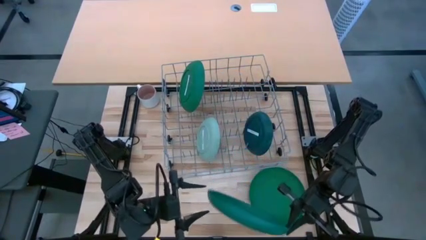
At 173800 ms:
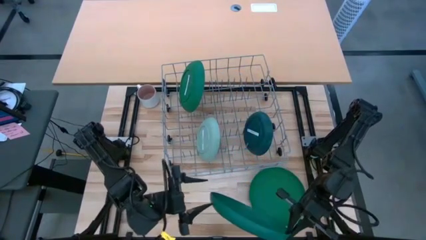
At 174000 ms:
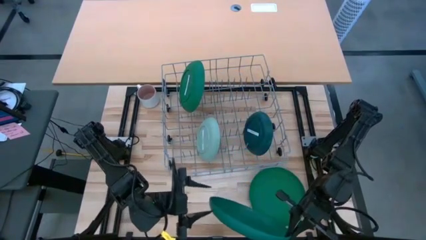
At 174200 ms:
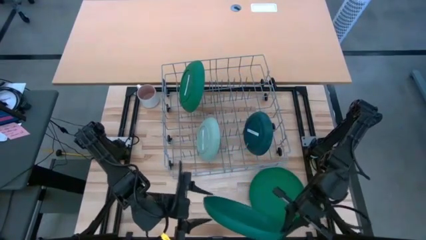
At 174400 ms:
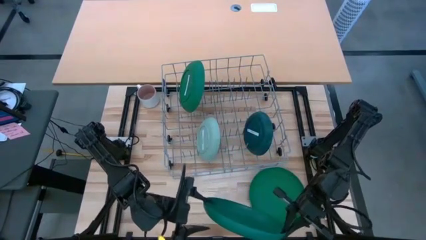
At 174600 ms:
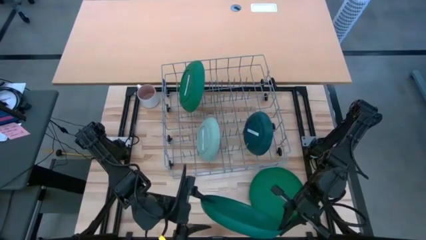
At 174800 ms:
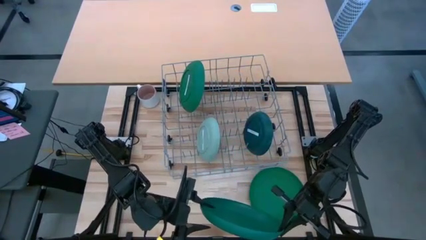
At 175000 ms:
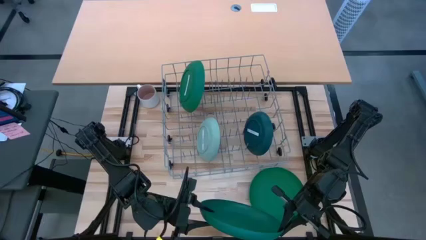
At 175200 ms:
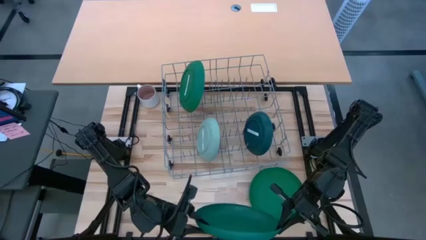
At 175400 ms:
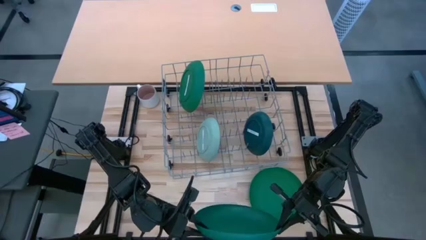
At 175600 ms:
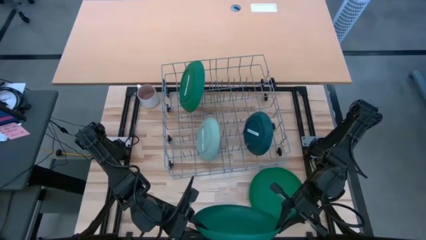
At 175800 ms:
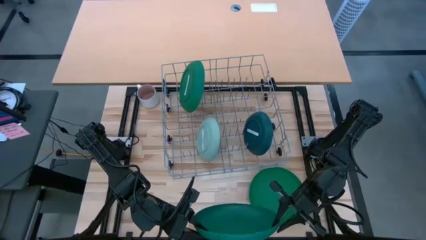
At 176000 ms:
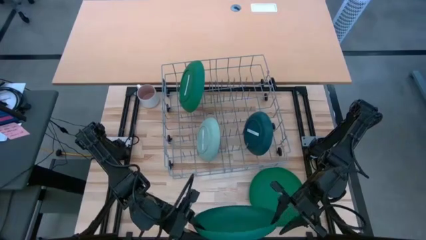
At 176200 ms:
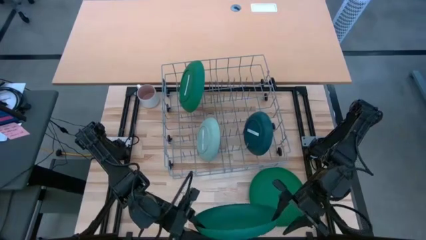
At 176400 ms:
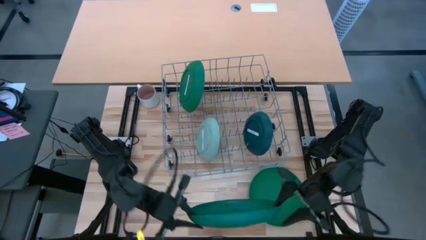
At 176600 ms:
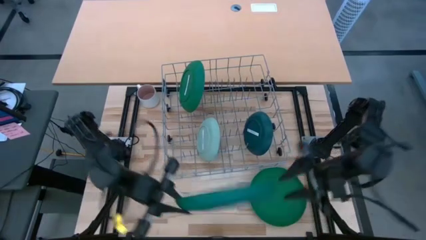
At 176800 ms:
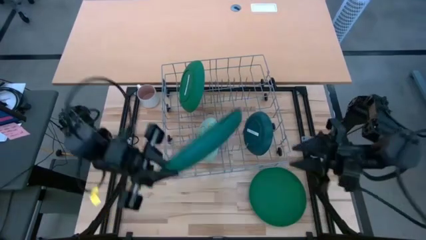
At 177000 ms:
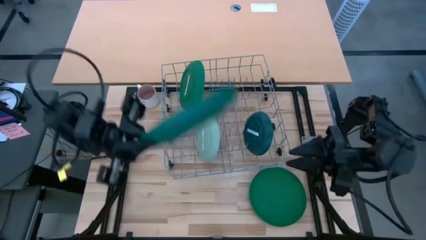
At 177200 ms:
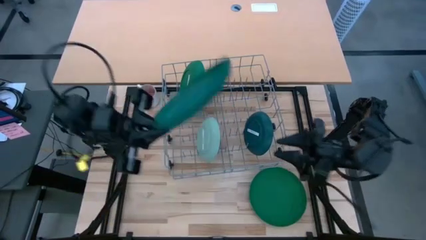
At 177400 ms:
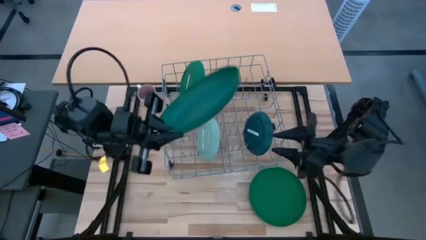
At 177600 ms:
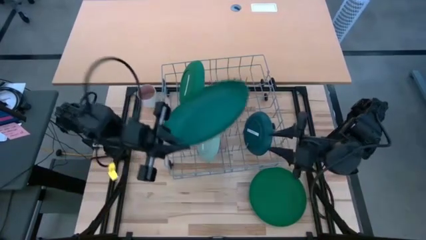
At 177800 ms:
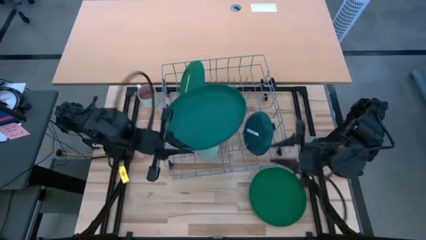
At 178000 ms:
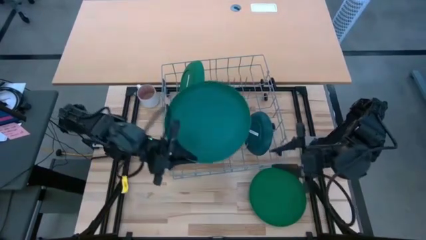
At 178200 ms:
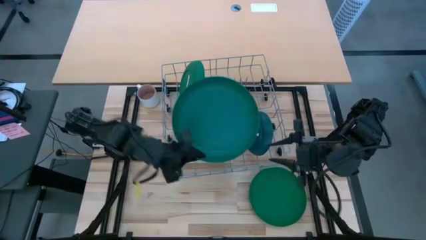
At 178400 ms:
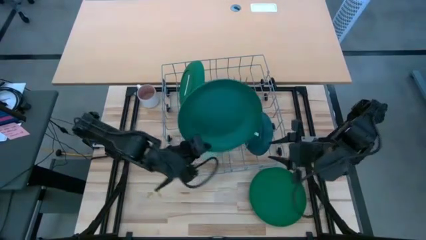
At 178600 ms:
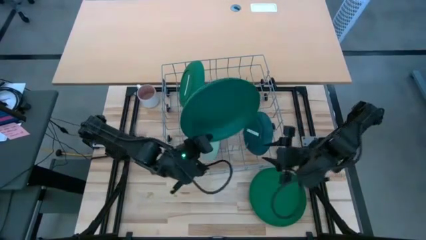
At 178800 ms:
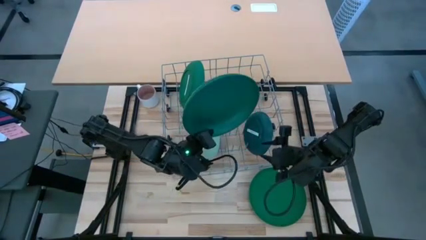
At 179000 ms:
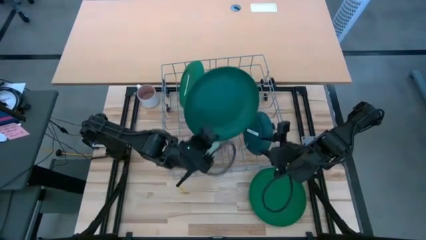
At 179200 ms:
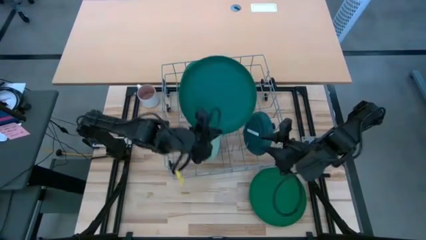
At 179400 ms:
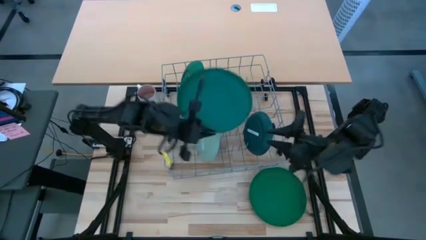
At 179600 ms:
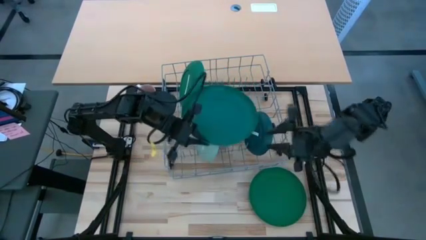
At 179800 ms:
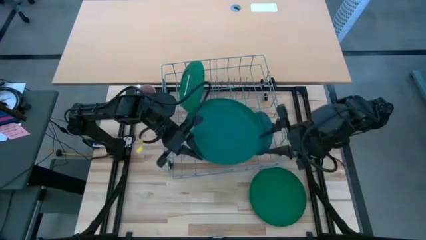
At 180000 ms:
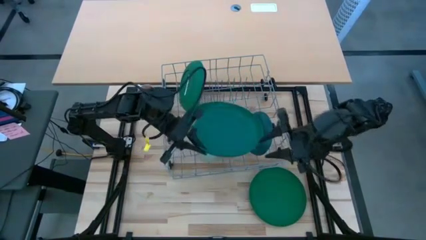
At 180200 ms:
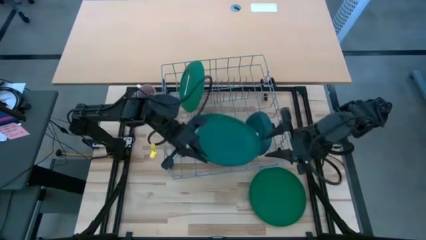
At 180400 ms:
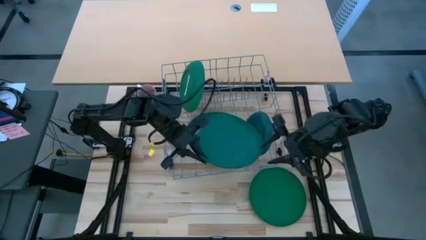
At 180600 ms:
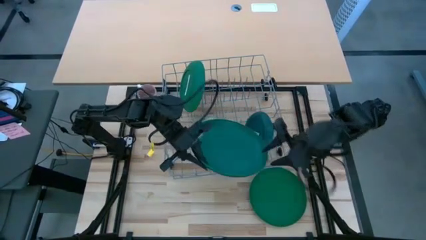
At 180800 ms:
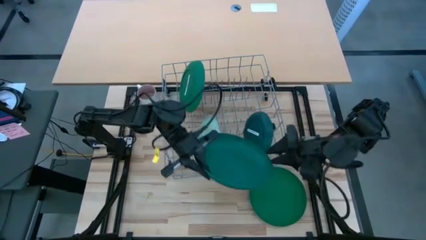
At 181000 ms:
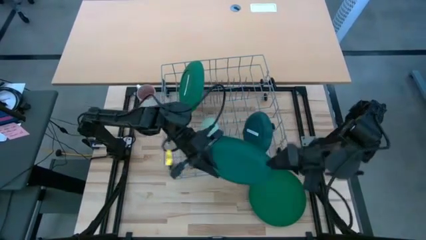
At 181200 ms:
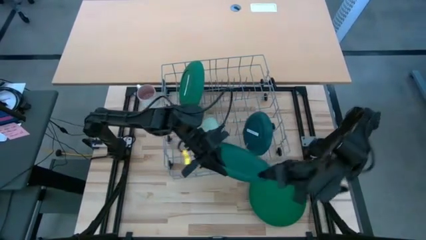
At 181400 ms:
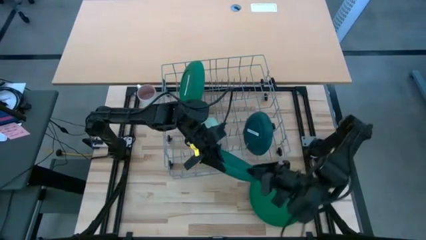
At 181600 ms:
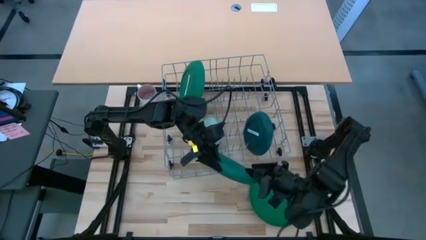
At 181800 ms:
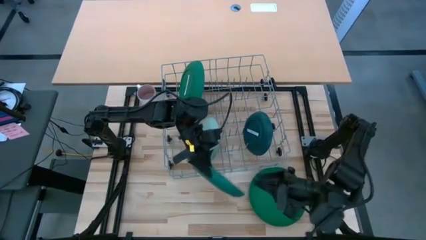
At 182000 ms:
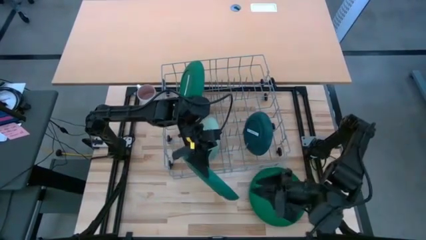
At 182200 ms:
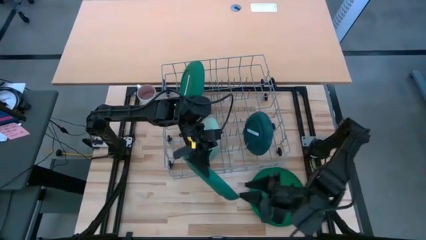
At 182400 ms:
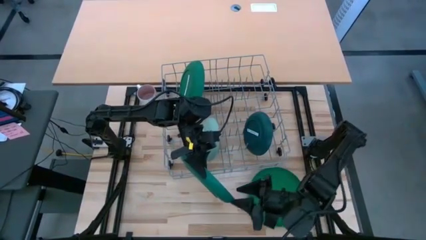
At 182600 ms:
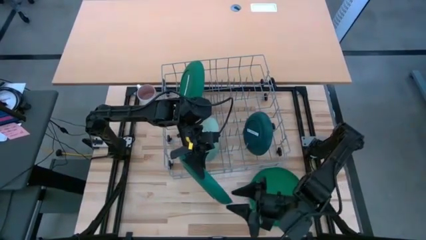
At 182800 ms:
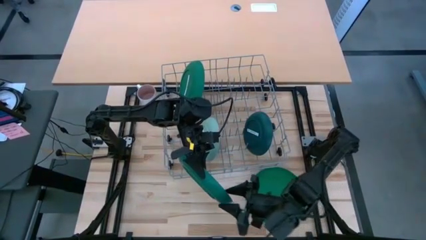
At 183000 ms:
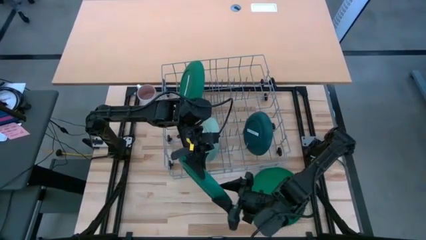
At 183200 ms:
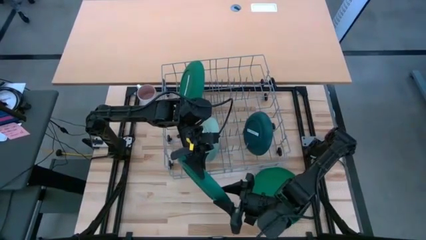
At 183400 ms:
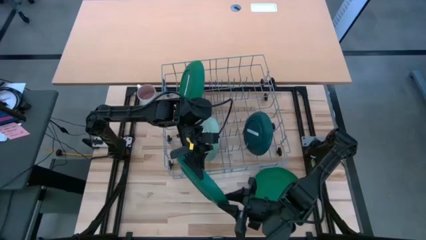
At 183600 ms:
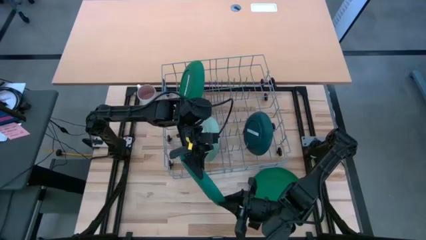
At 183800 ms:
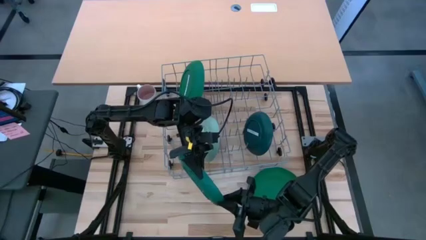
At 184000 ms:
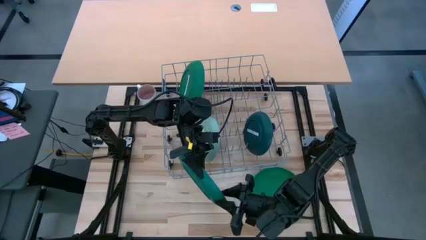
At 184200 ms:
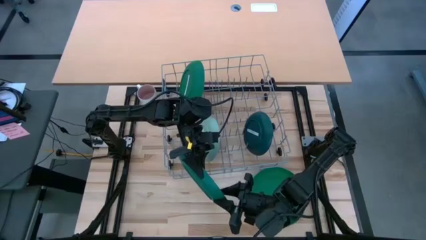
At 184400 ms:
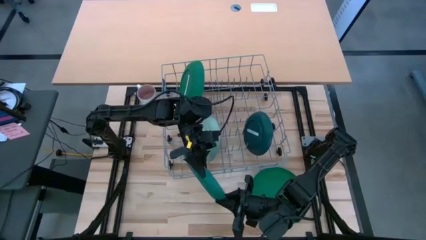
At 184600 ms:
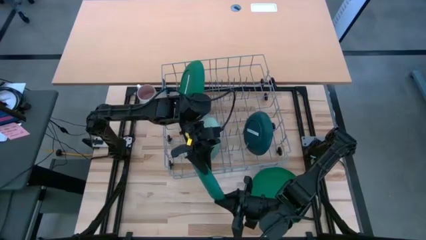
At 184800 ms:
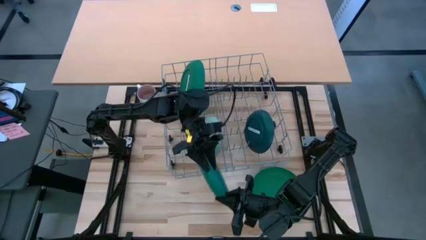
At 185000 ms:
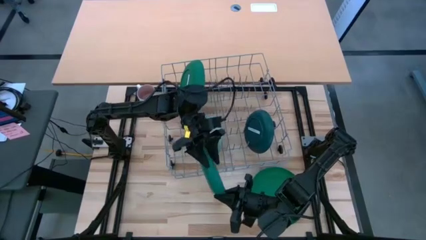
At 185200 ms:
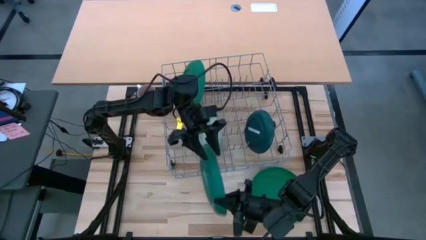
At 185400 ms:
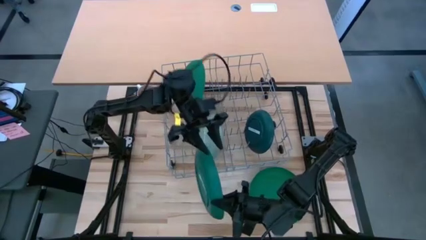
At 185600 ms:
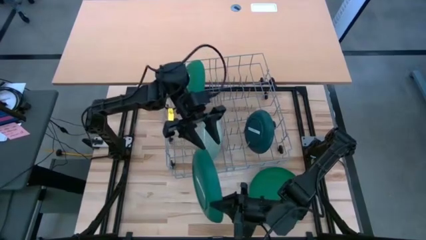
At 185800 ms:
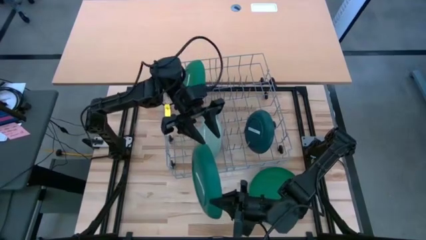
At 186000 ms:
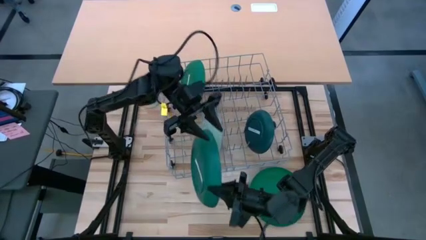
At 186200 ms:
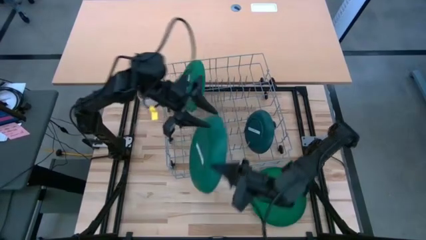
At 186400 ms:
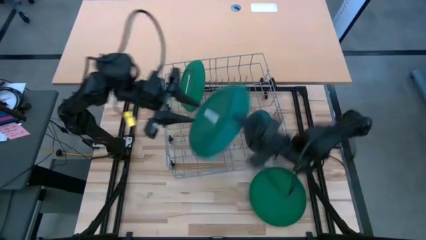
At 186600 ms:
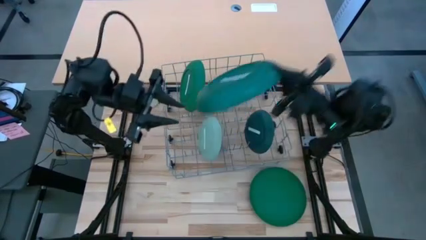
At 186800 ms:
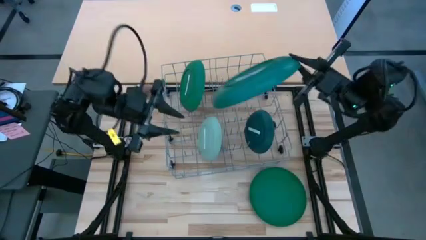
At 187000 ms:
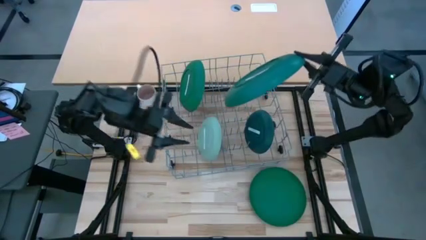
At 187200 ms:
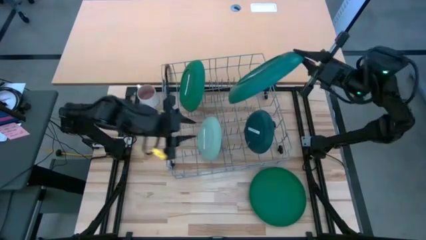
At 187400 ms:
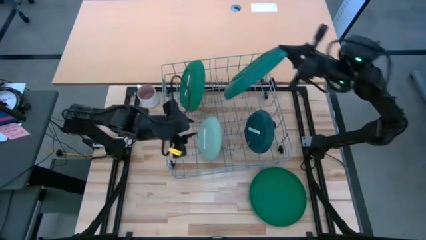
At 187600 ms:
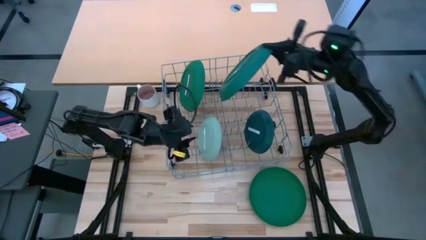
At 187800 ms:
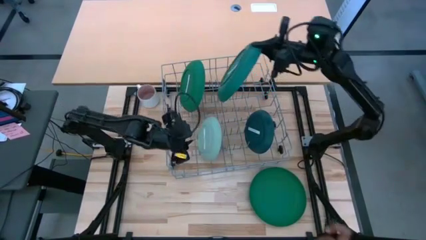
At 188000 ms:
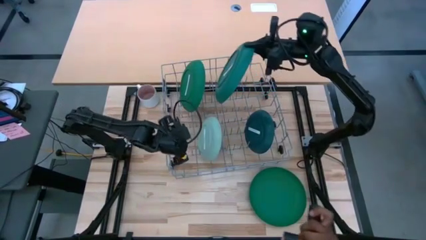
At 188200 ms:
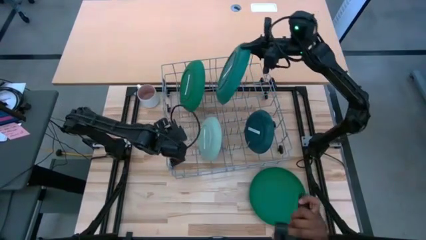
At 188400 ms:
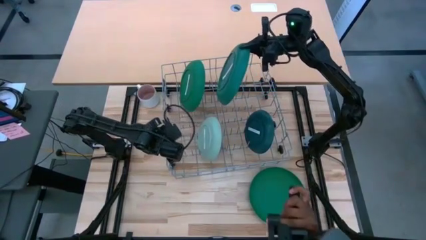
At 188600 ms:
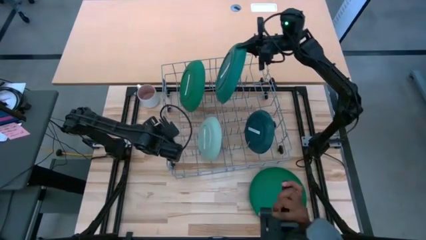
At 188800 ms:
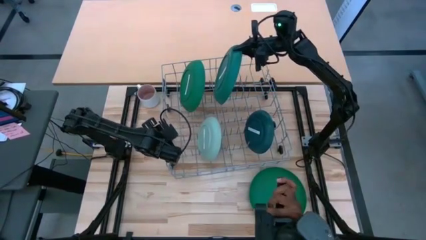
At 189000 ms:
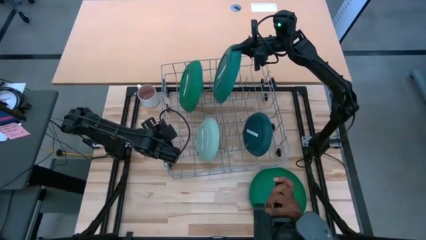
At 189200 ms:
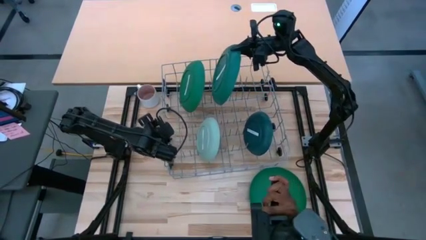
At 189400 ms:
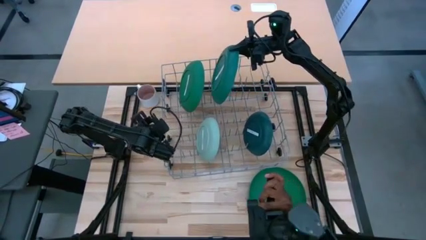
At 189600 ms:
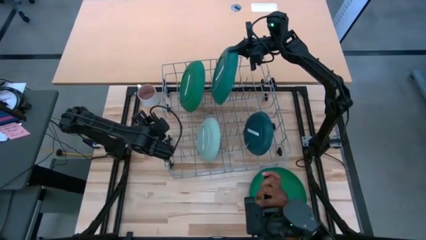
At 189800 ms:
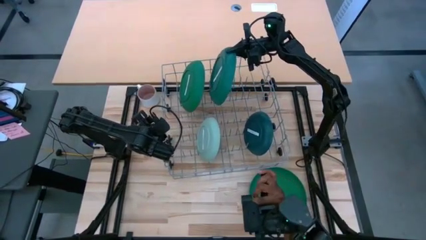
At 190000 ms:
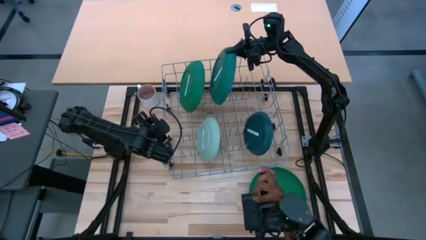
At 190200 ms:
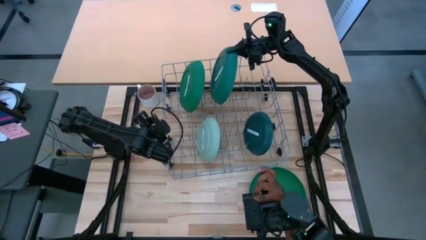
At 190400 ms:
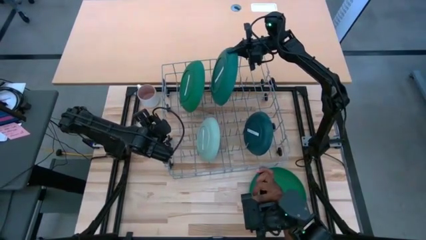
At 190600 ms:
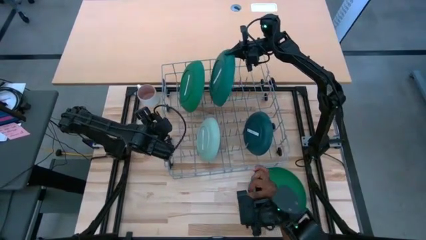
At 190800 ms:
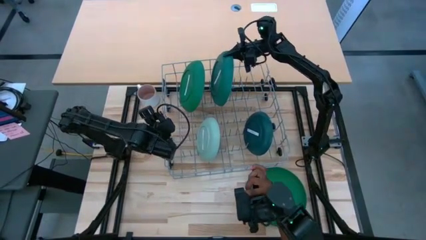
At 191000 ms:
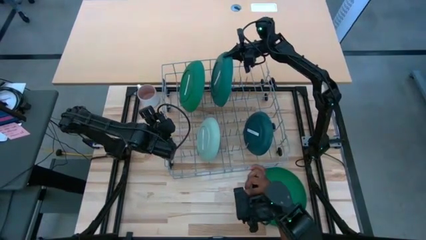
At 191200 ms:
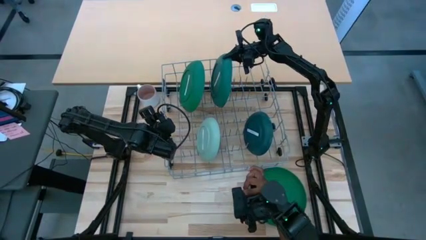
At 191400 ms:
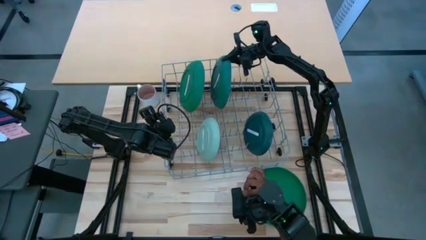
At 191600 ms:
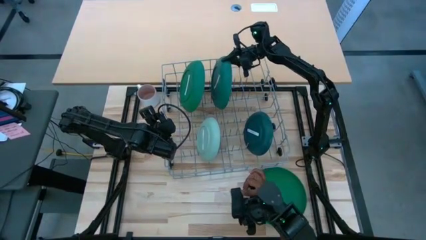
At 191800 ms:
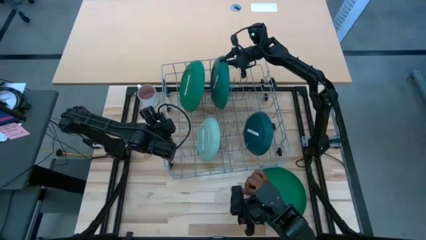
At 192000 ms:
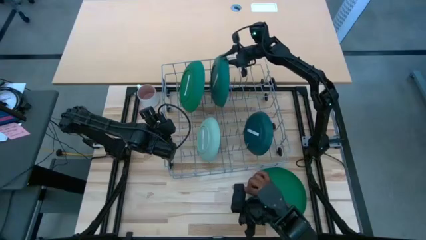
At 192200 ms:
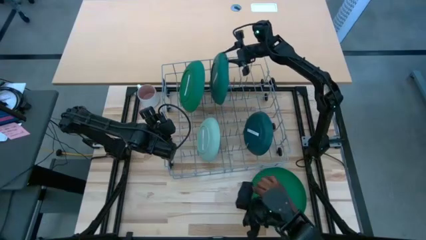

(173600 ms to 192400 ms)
Task: Sort dishes
Put the stacked green plate in the dish rack
